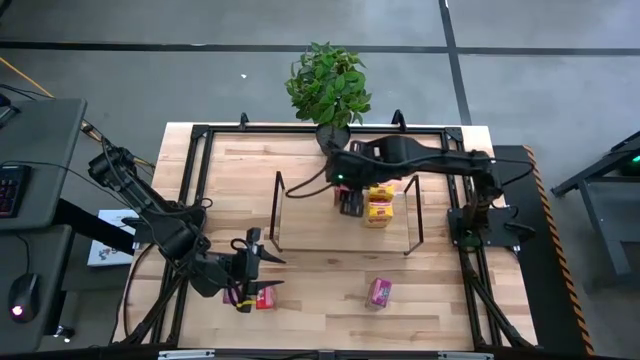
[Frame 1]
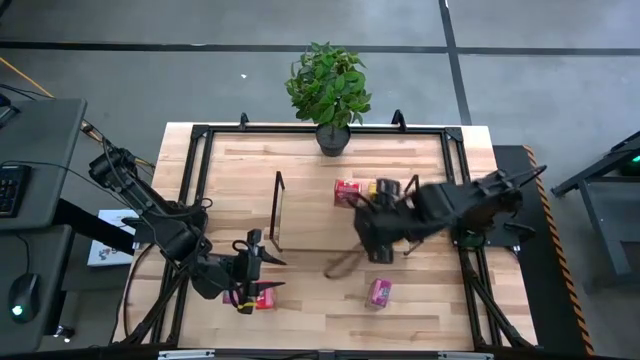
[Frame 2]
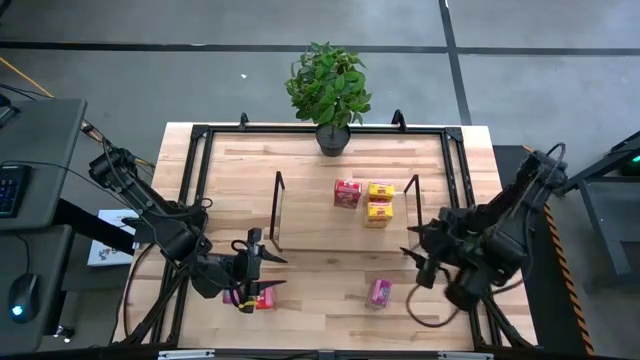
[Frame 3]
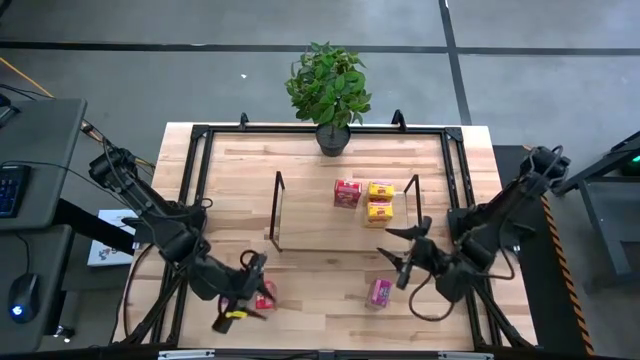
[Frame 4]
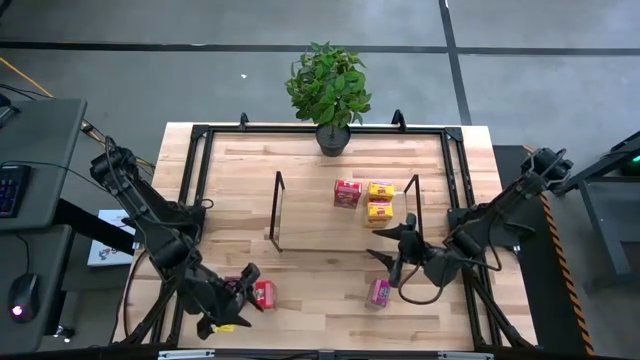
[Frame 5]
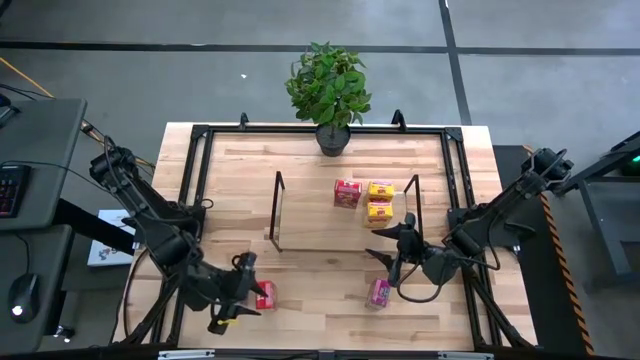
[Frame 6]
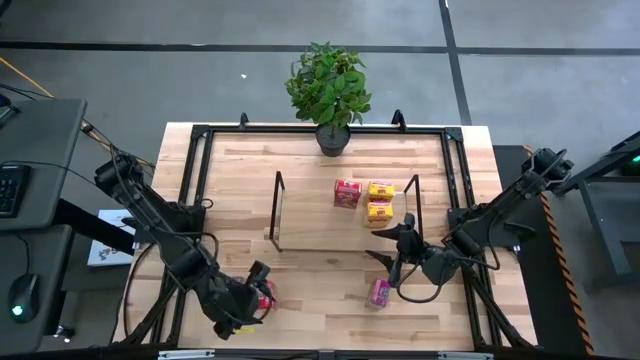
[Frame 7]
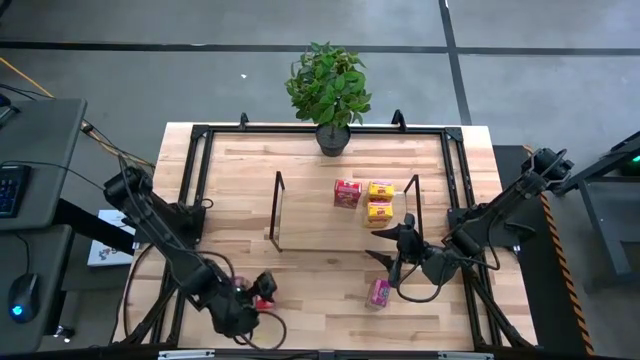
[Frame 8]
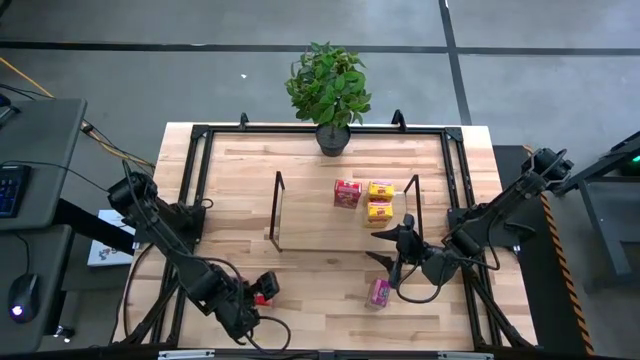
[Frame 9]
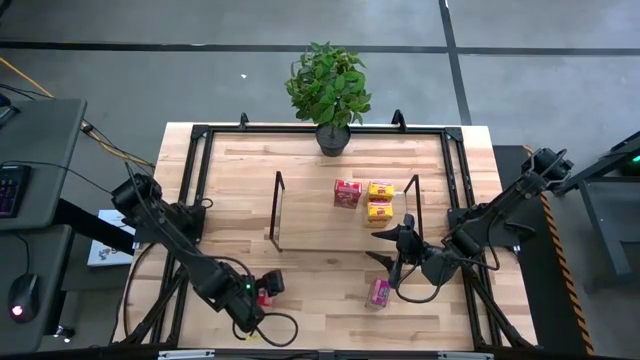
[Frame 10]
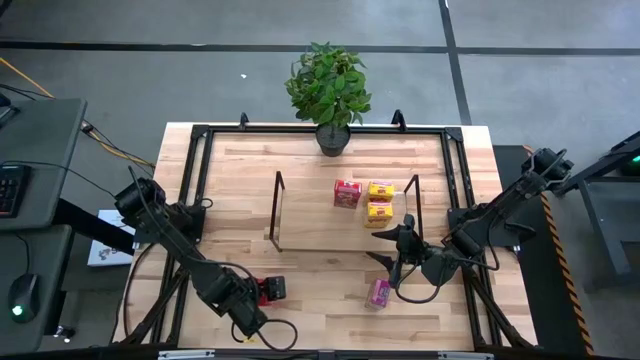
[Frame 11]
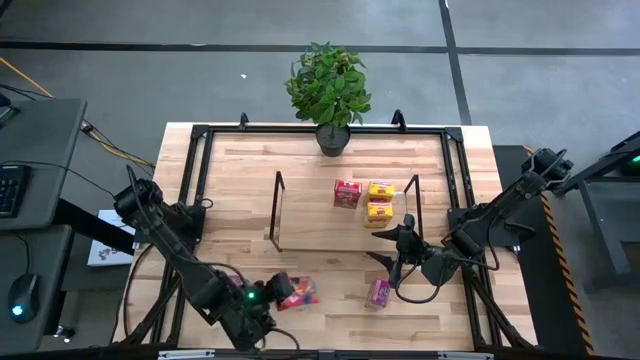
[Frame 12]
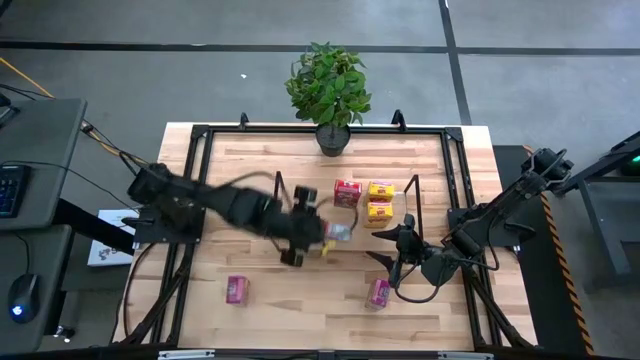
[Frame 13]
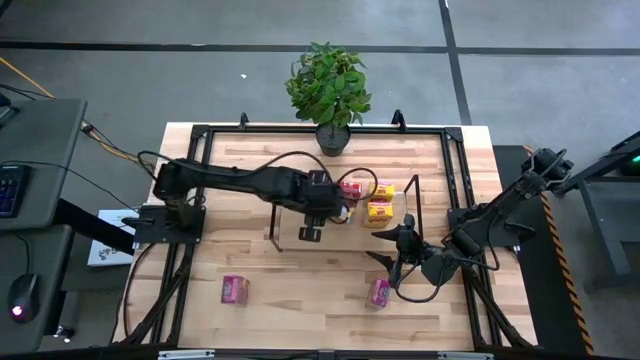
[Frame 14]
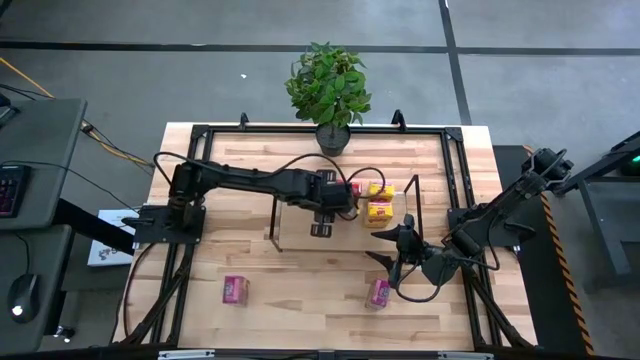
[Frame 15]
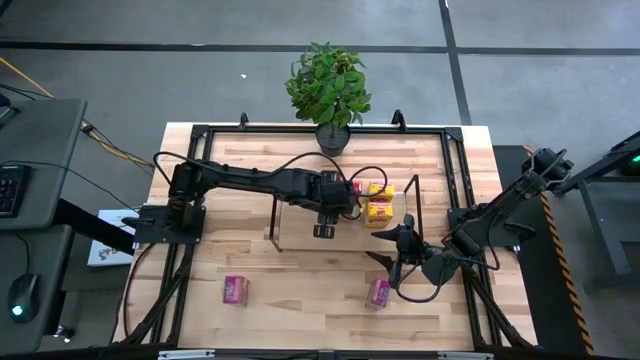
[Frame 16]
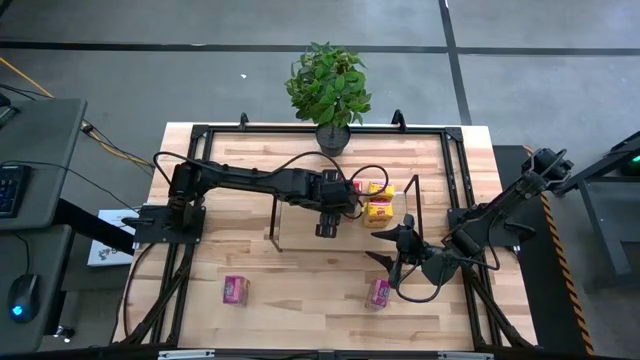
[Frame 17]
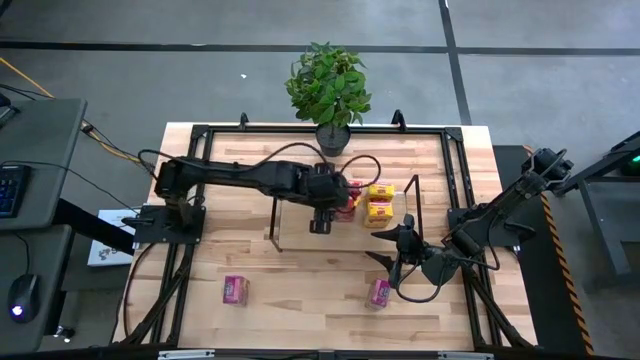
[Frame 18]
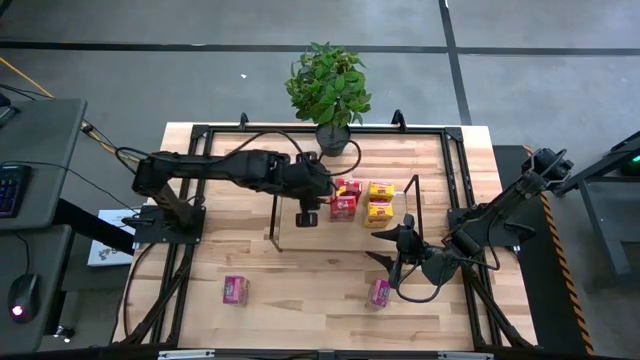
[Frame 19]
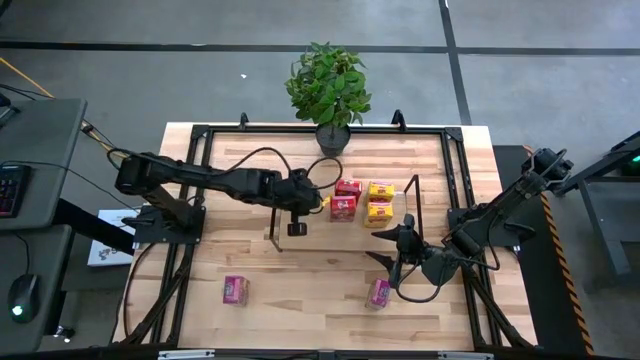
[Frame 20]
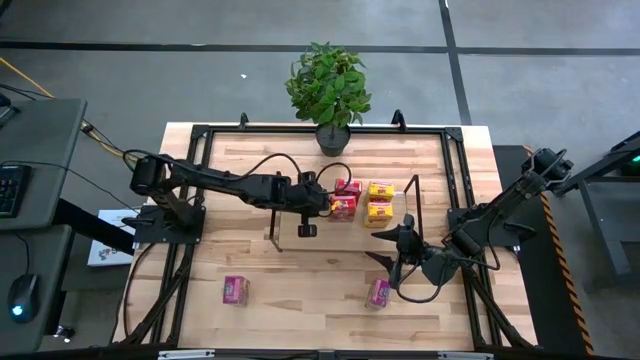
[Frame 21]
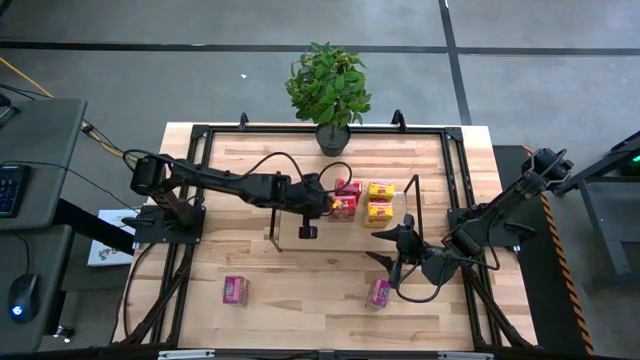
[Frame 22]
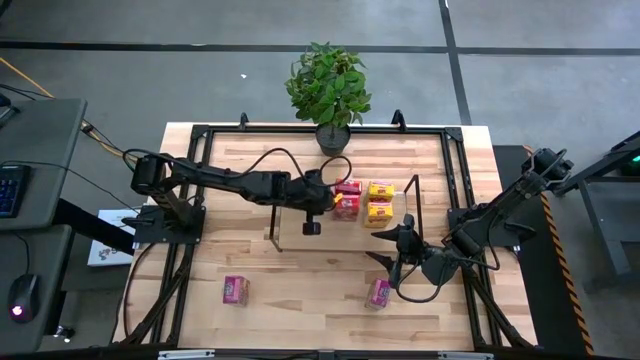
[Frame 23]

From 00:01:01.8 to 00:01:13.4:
Task: Stack cereal on shelf
Put the red cereal box on the shelf aligned with the other red cereal box

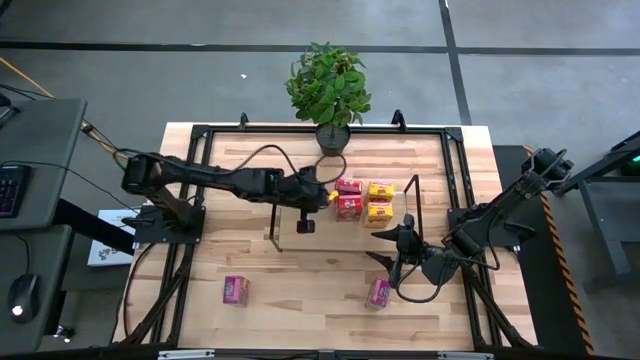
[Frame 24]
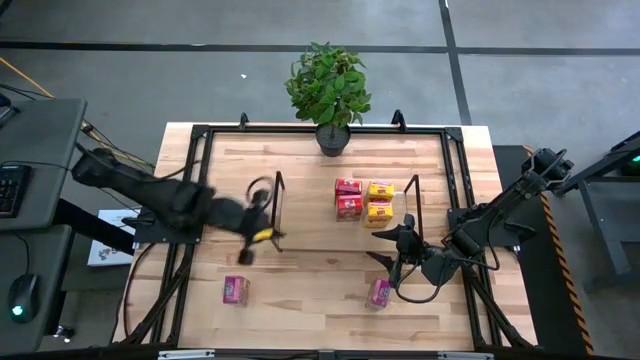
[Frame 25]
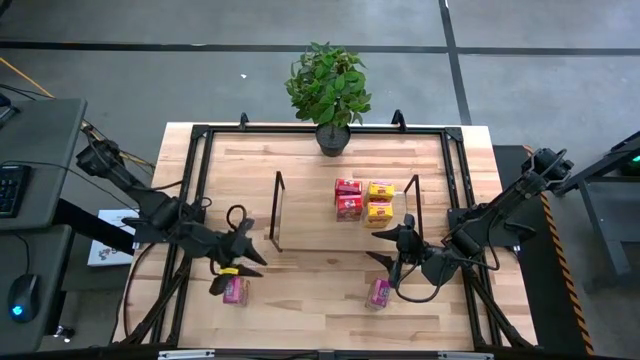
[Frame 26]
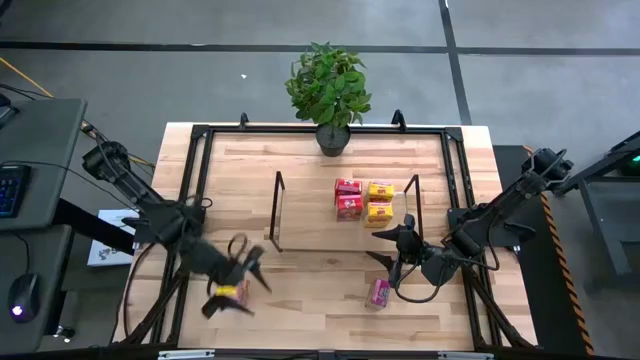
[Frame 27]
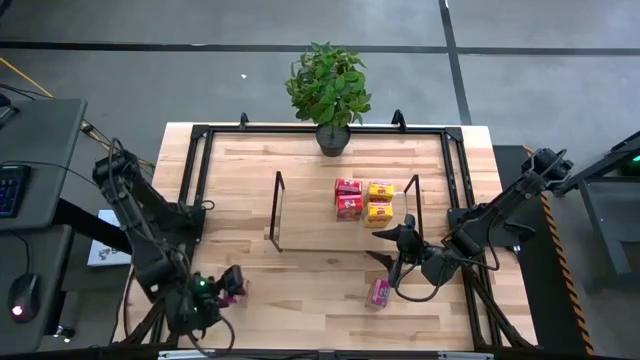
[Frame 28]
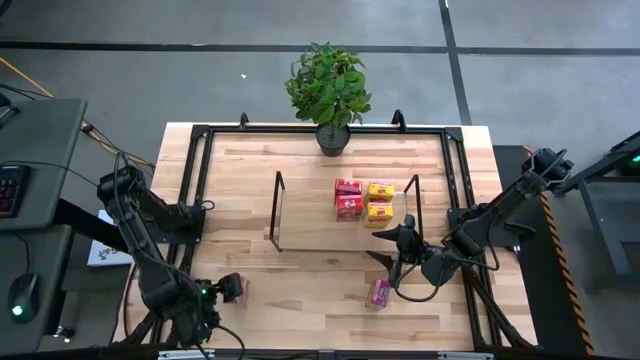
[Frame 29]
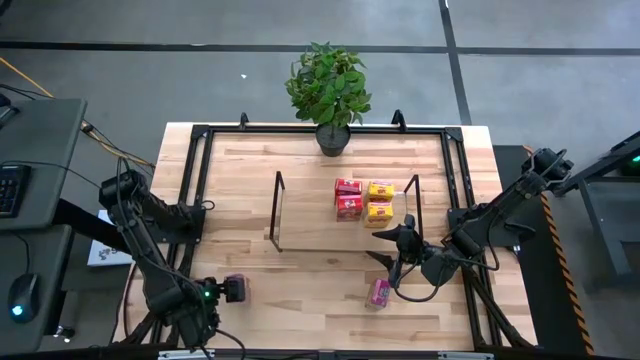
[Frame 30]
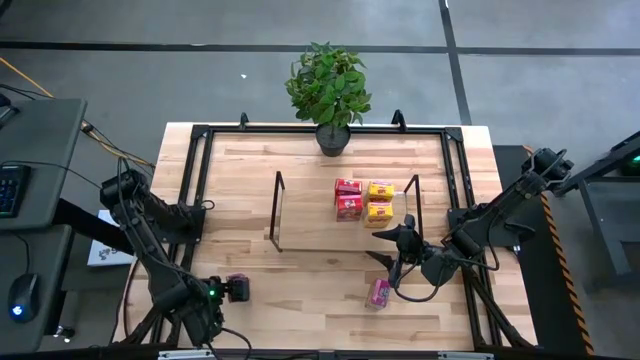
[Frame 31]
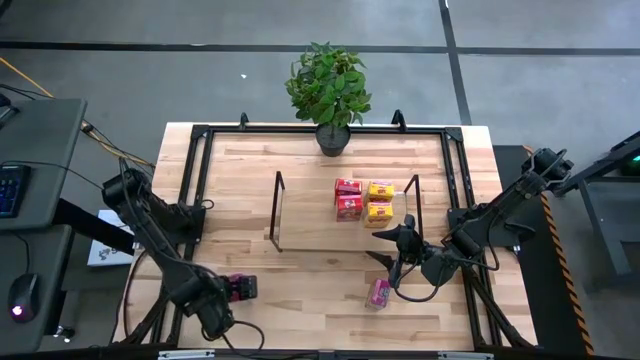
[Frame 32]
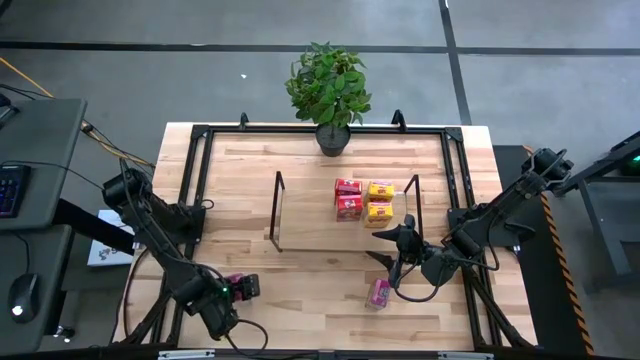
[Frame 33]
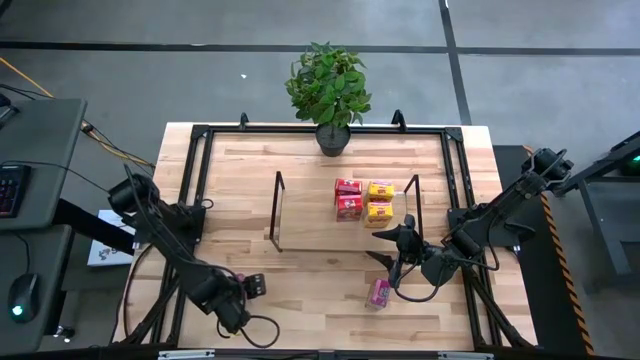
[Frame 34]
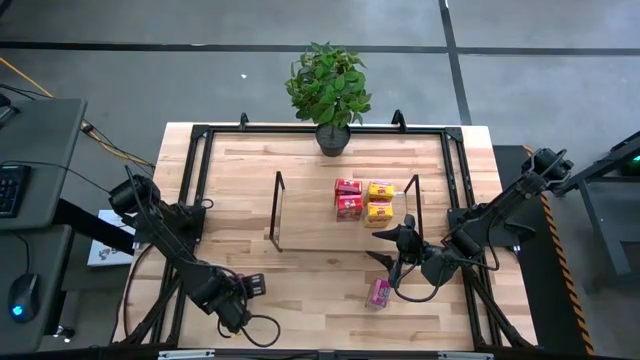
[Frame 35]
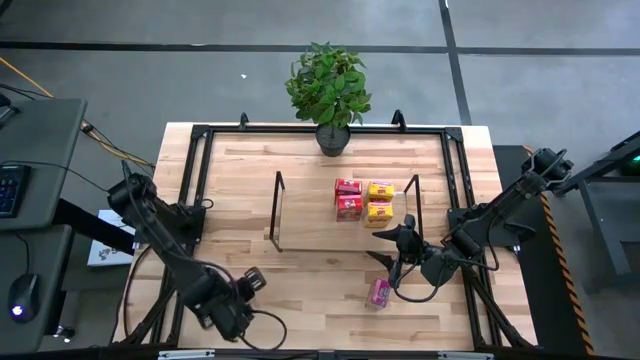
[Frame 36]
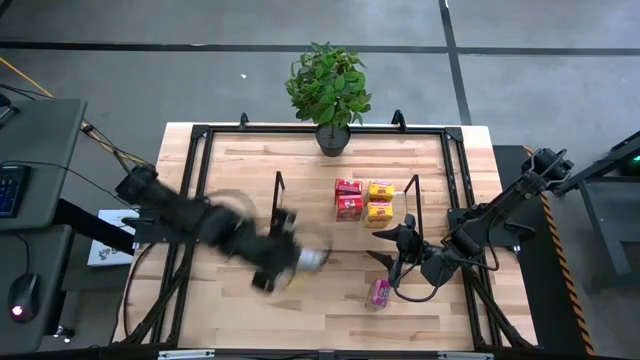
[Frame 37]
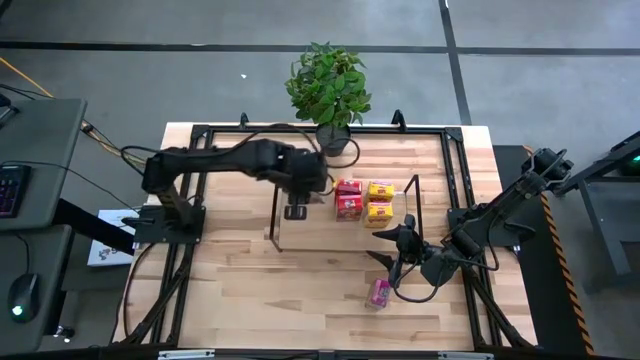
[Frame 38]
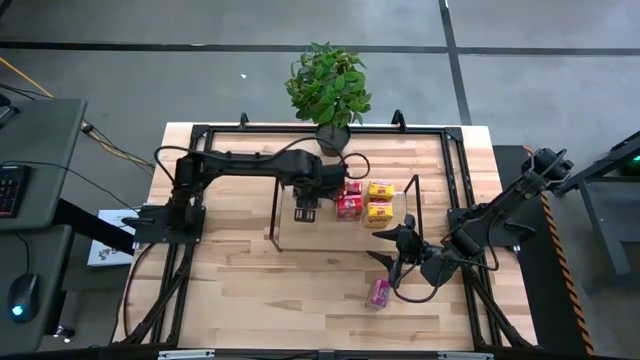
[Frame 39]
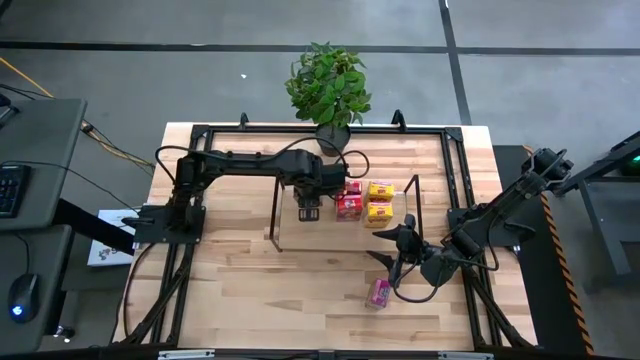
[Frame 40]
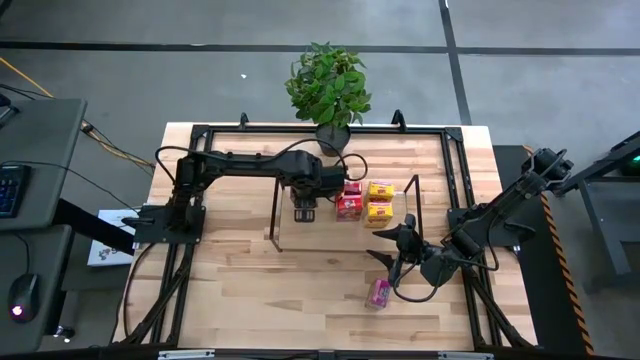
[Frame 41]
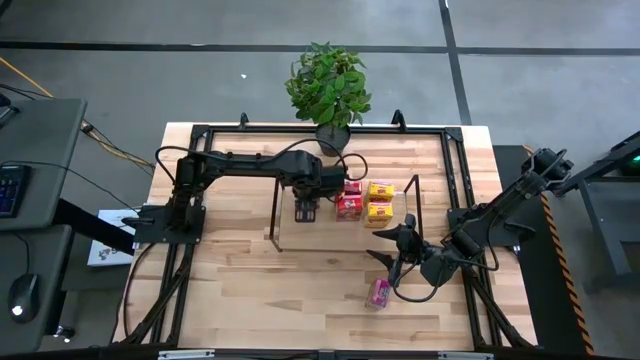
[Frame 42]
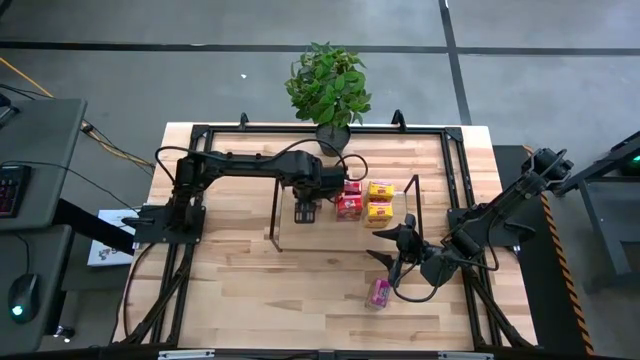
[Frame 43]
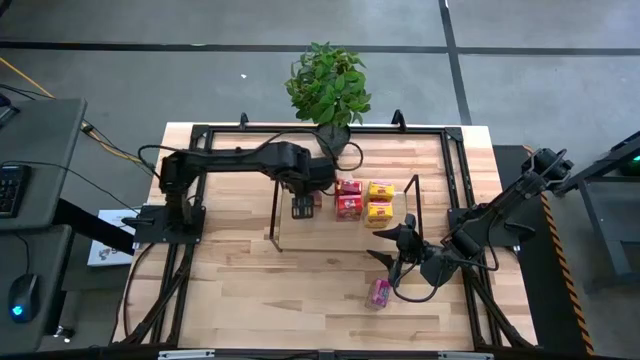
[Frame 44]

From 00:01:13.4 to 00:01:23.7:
Put the left purple cereal box on the shelf
